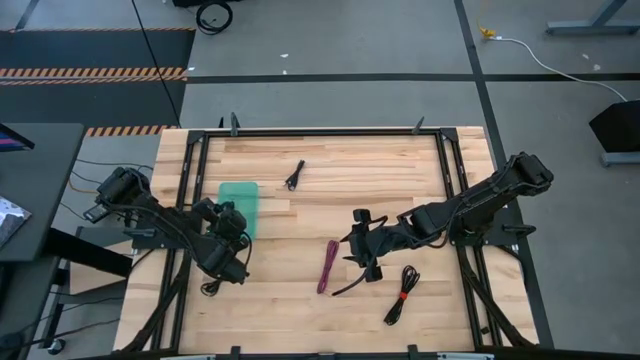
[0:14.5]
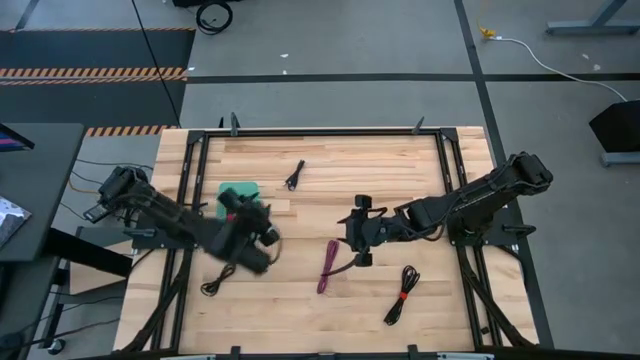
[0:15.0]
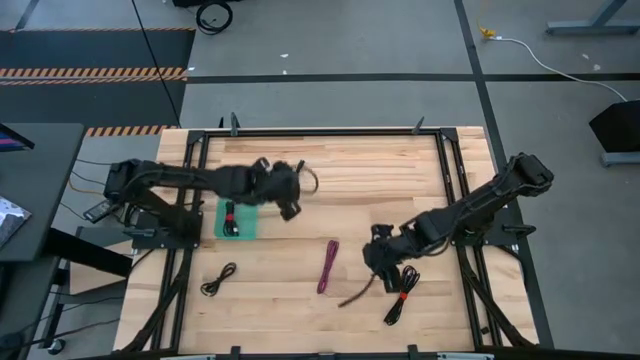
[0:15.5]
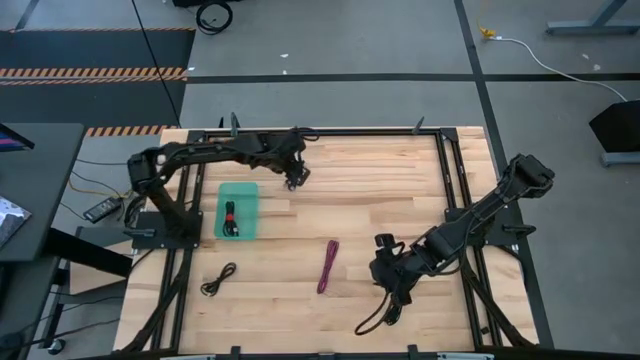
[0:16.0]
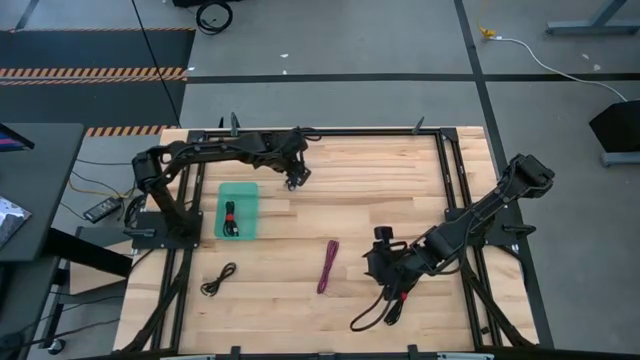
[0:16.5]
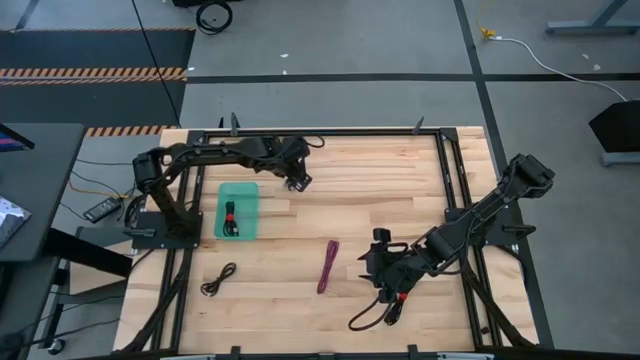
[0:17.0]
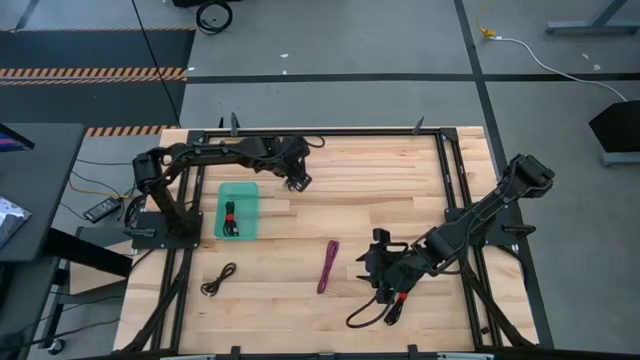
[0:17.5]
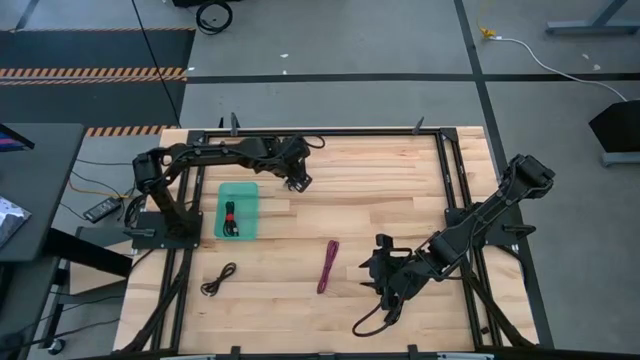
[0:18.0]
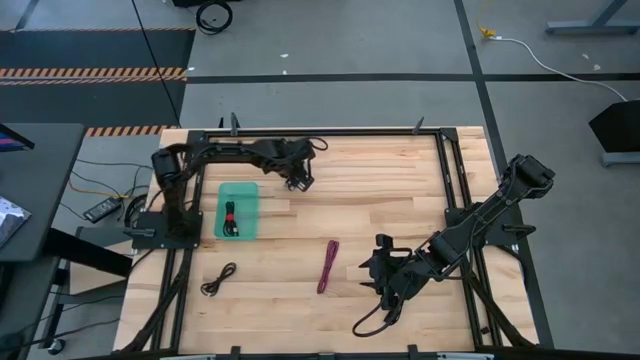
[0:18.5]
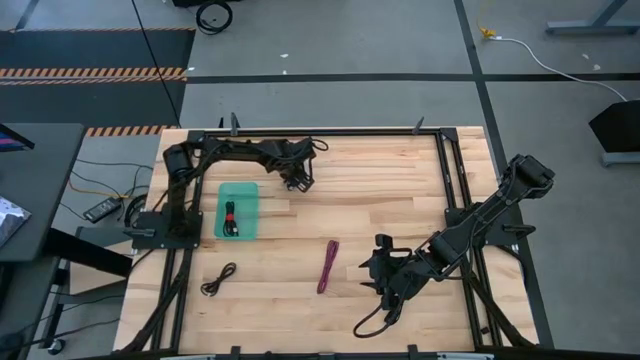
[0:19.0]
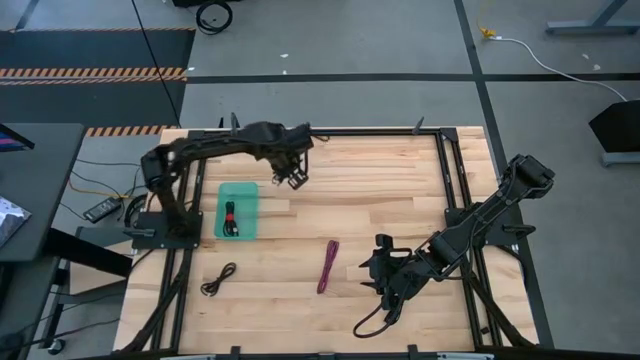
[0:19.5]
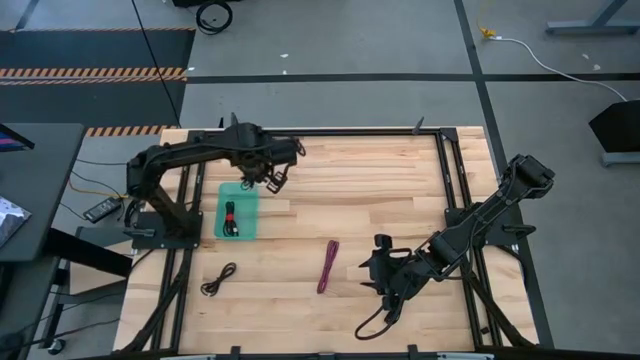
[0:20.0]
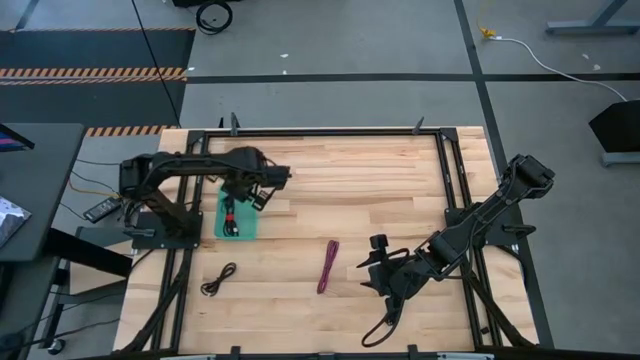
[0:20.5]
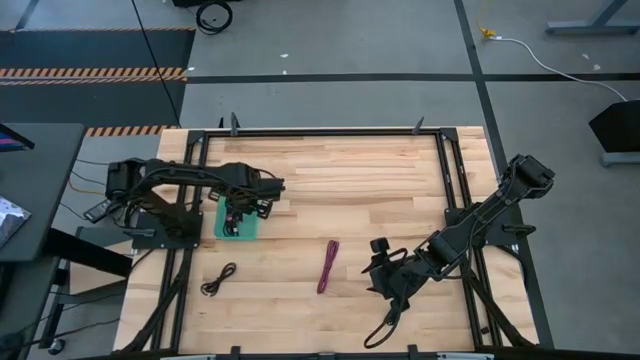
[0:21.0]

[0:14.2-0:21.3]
Task: Pick and place USB-C Cables
Put the black USB cable into the green bin

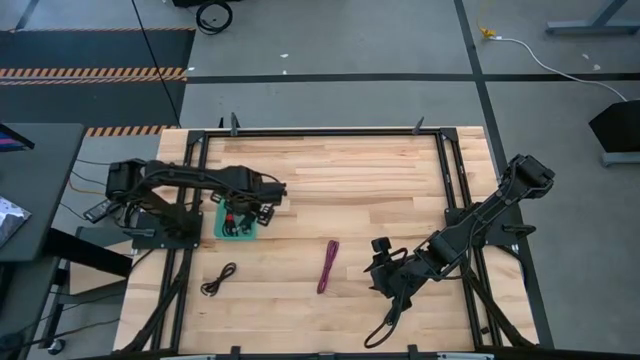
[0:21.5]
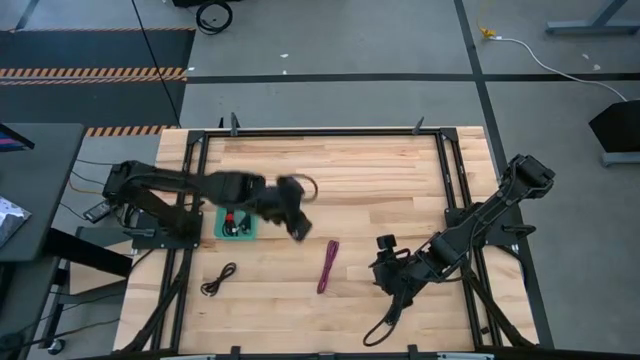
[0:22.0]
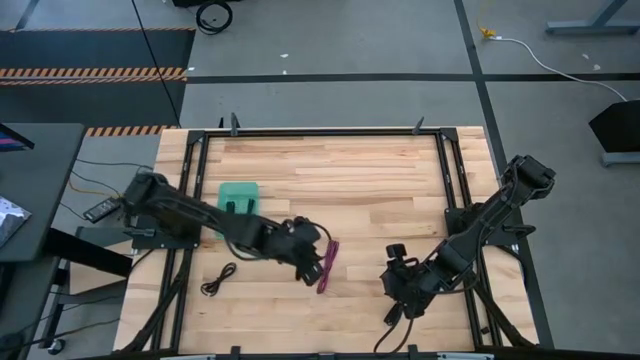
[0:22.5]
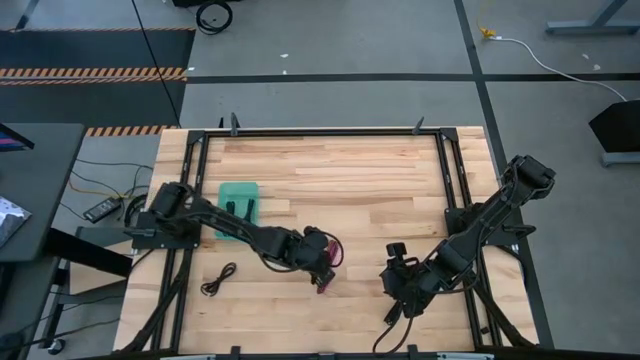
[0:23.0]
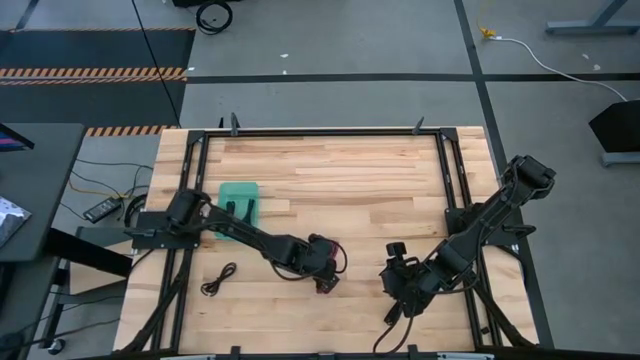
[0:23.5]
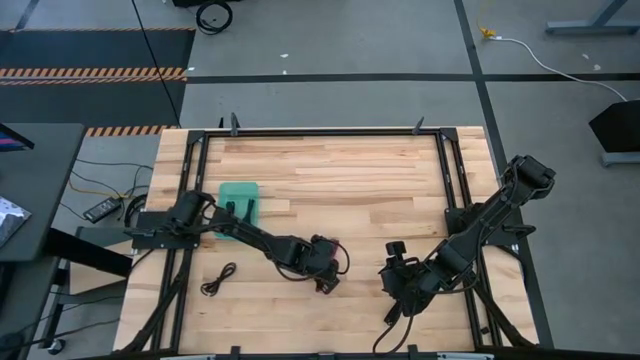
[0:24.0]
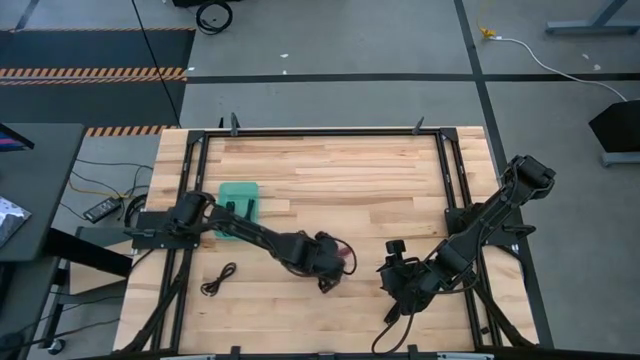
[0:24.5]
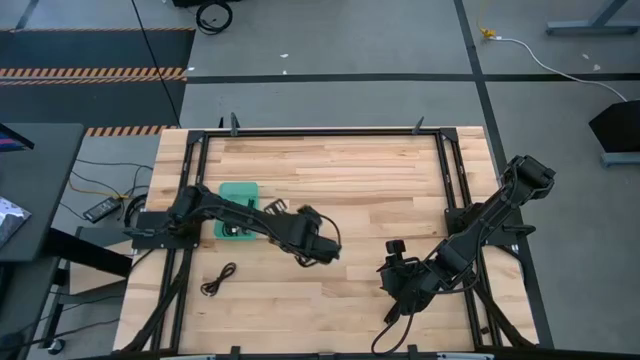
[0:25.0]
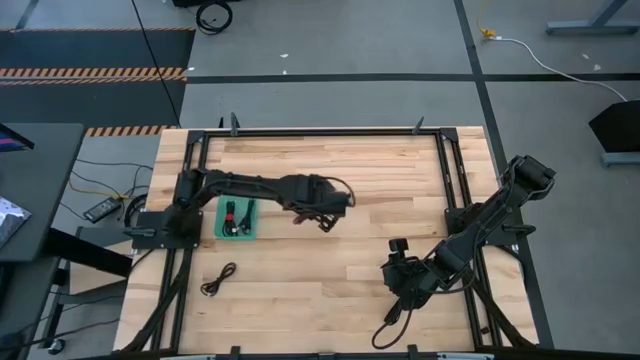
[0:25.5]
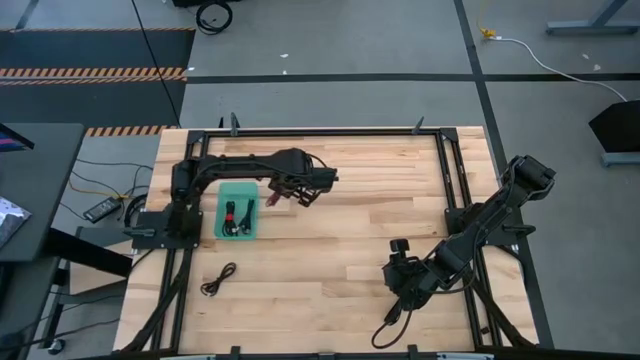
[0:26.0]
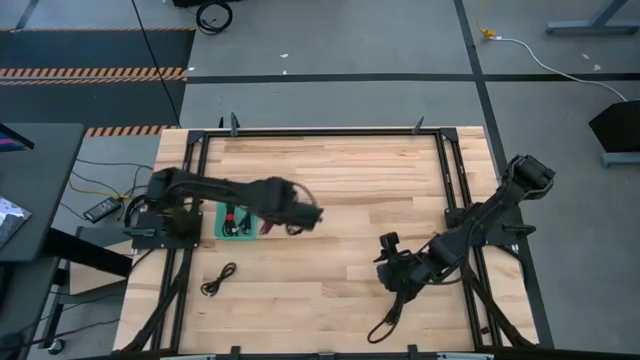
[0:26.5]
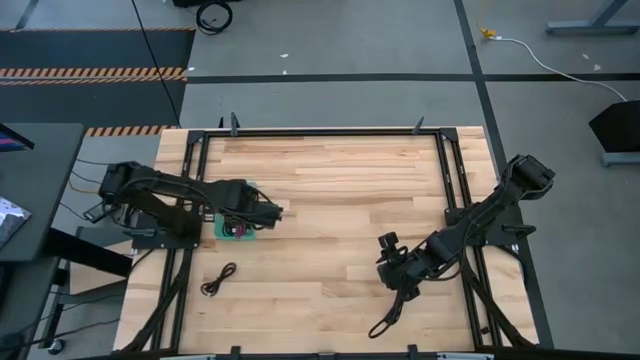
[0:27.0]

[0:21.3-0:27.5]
Put the pink USB cable into the green bin

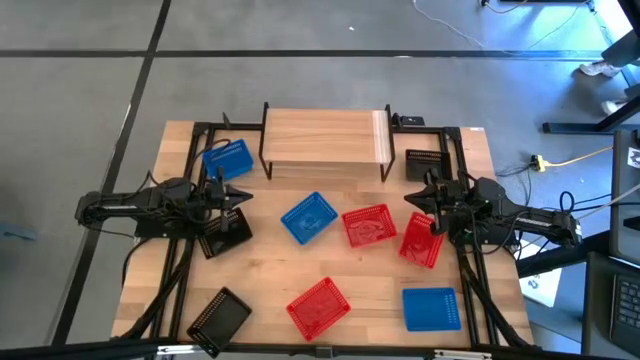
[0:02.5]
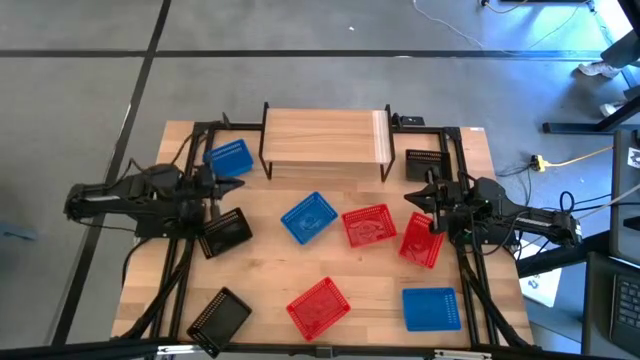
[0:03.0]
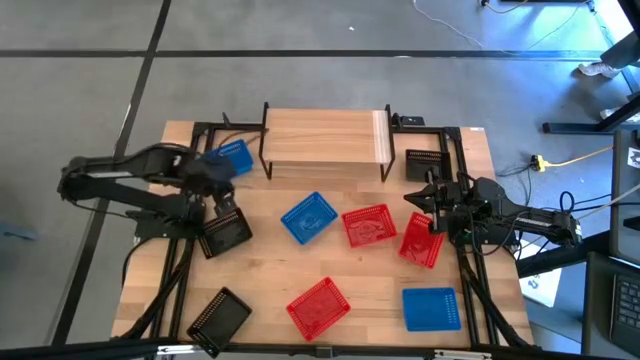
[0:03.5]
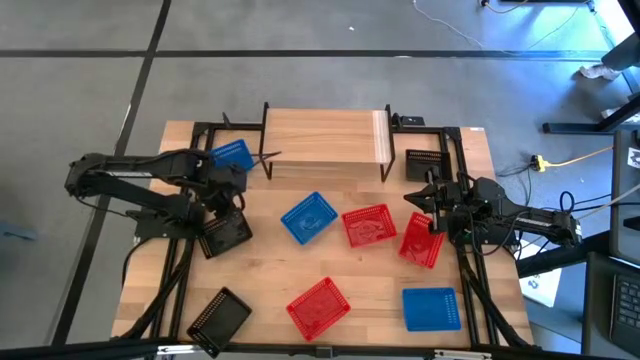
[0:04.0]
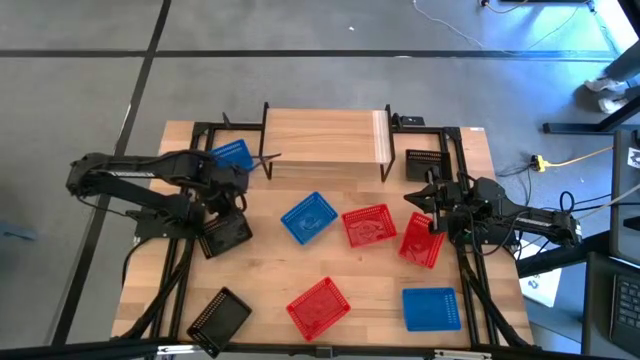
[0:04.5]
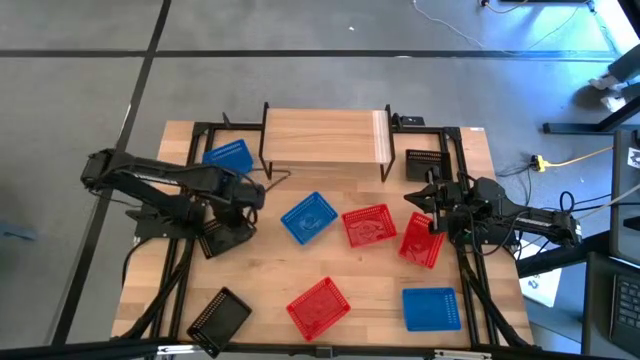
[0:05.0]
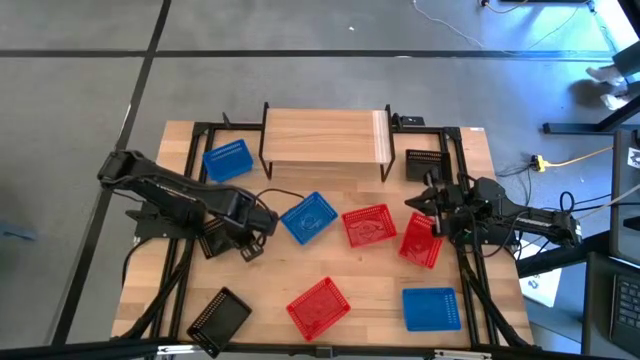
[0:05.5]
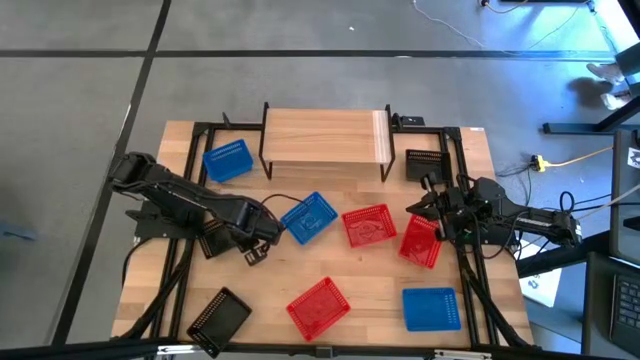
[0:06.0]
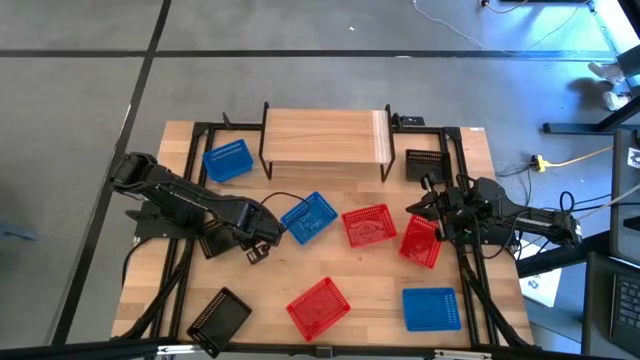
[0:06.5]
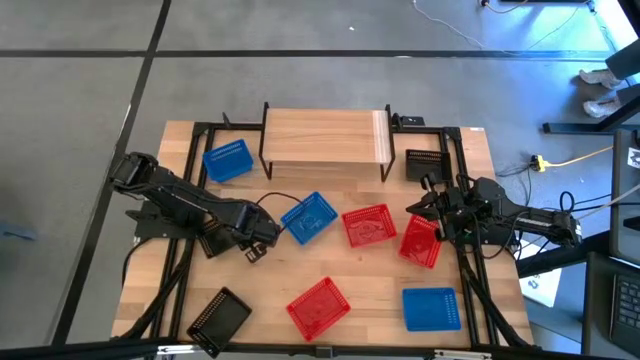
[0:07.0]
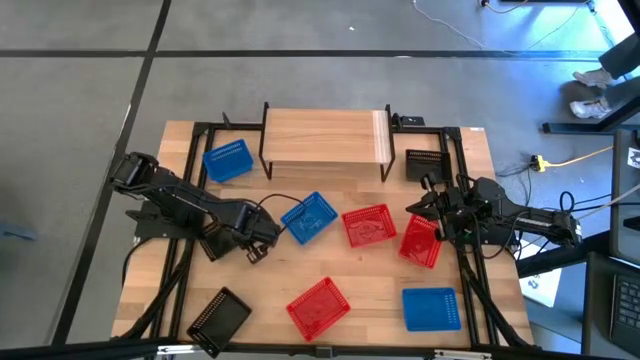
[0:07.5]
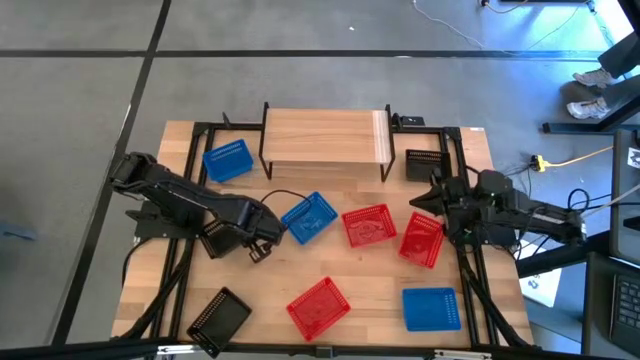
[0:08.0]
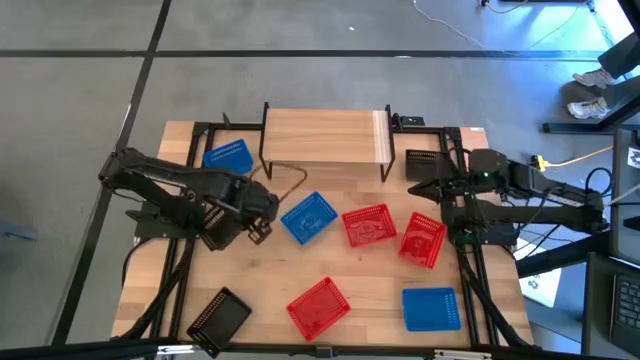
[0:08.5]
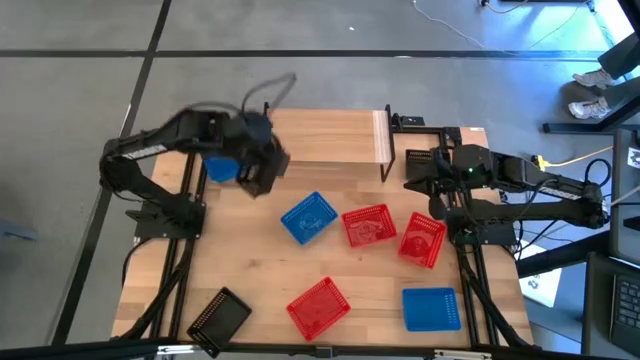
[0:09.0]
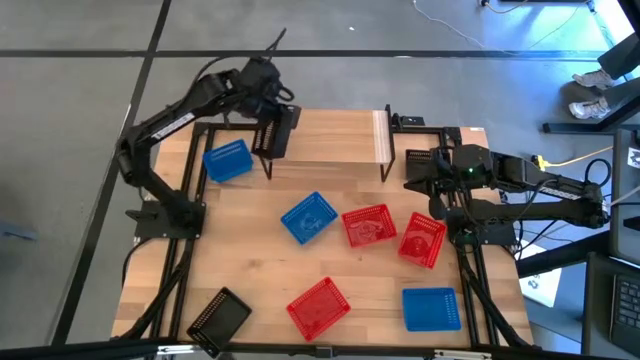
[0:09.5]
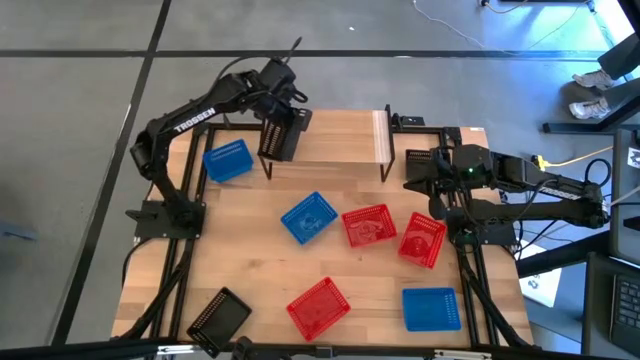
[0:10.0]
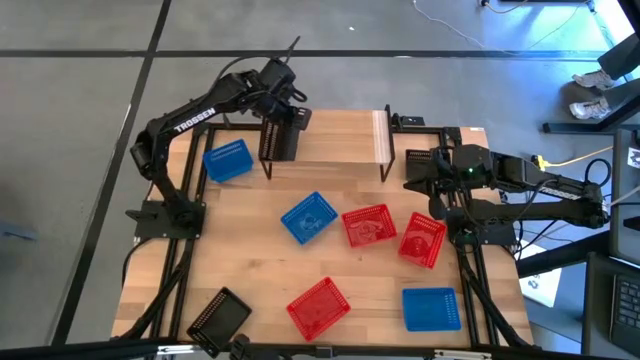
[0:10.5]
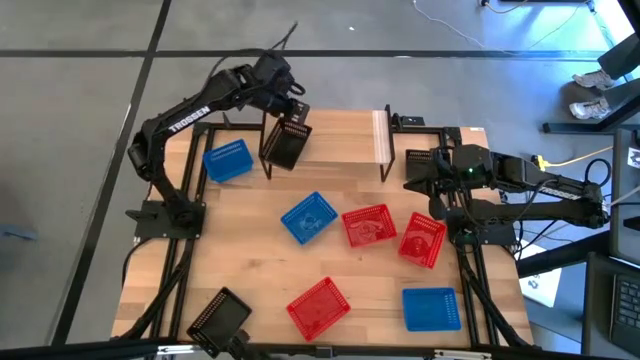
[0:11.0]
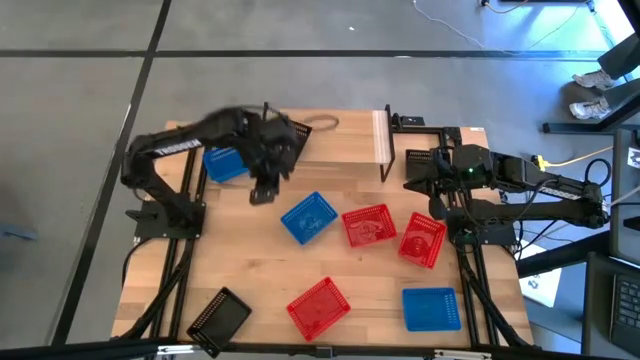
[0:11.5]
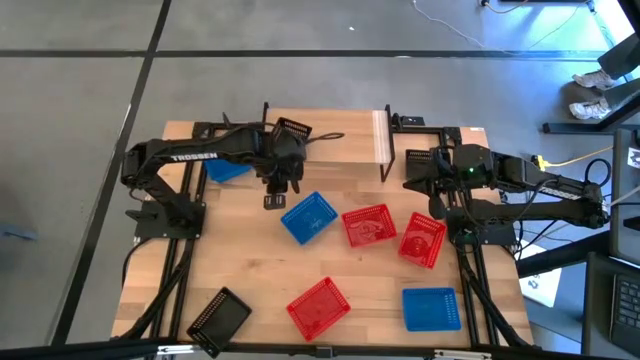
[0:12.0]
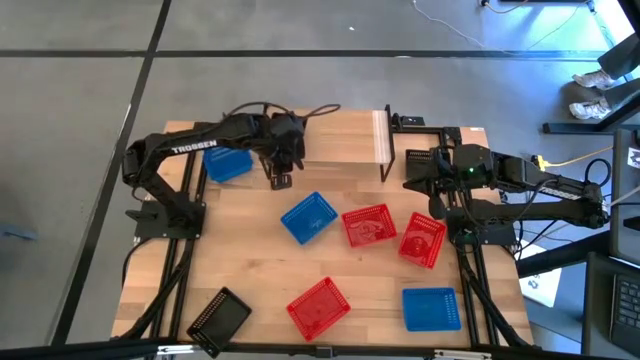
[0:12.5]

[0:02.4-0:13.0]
Task: Stack baskets on shelf by color
Put the top left black bin on the shelf
